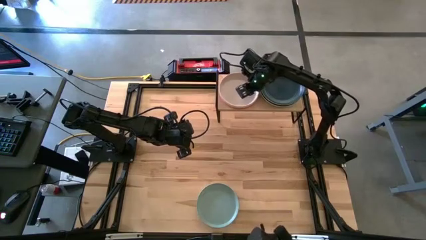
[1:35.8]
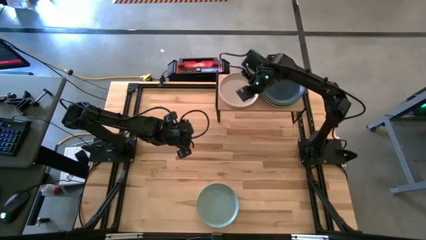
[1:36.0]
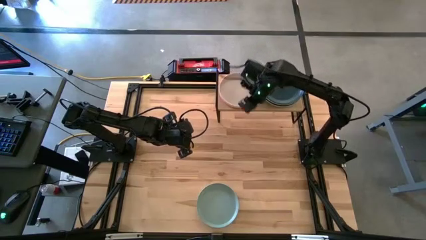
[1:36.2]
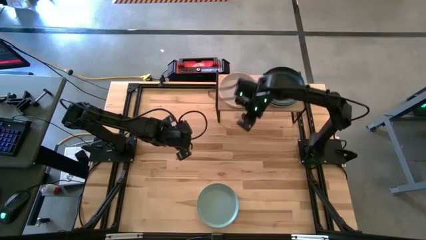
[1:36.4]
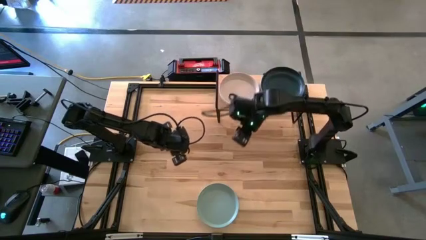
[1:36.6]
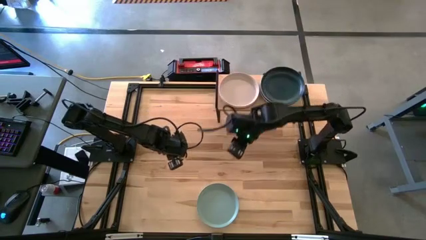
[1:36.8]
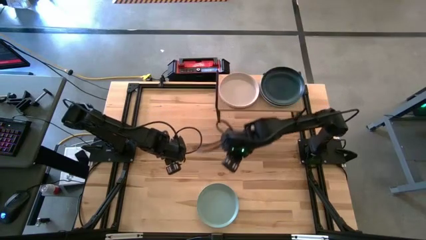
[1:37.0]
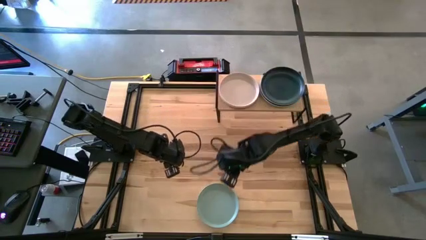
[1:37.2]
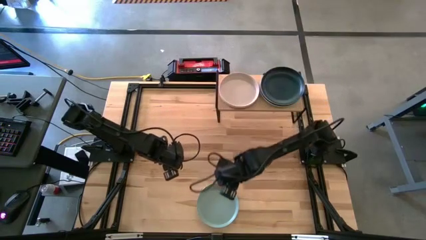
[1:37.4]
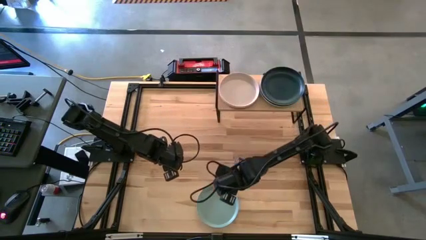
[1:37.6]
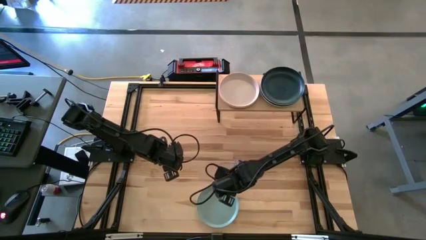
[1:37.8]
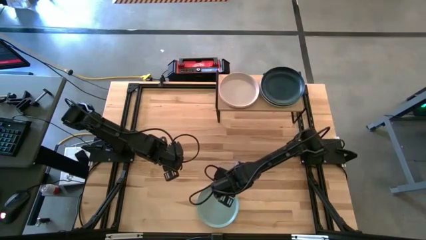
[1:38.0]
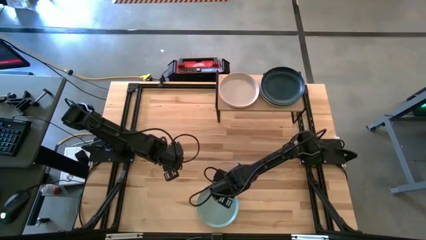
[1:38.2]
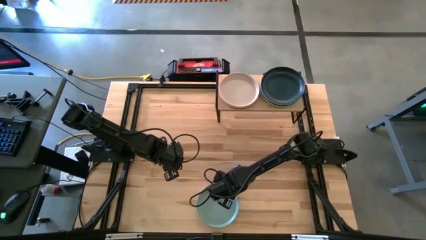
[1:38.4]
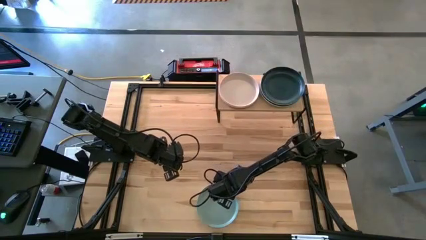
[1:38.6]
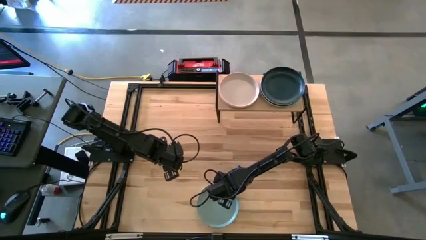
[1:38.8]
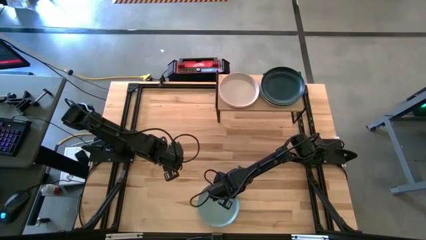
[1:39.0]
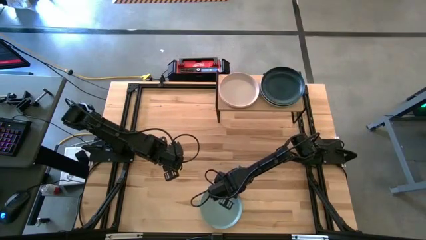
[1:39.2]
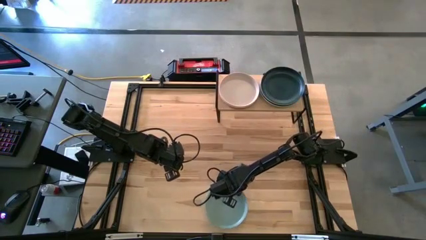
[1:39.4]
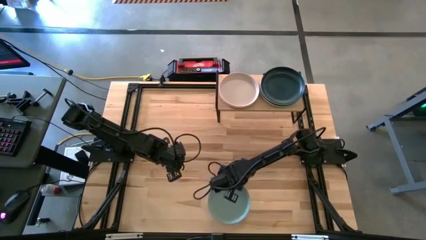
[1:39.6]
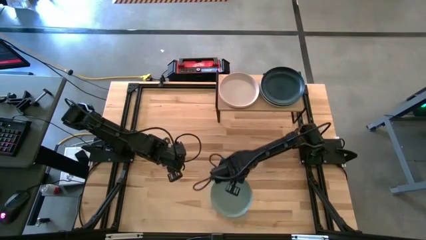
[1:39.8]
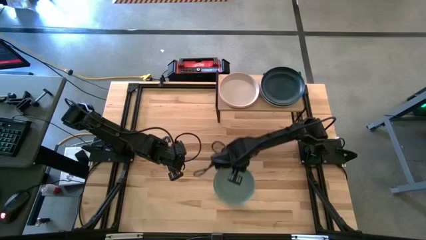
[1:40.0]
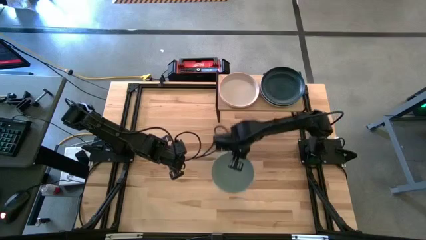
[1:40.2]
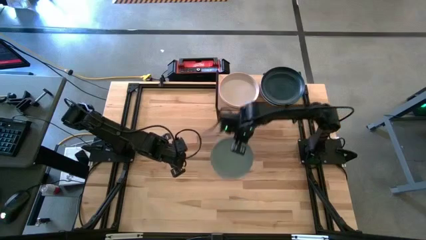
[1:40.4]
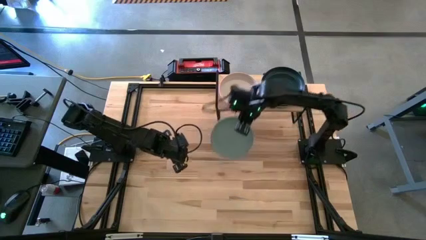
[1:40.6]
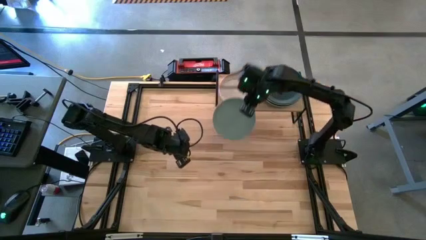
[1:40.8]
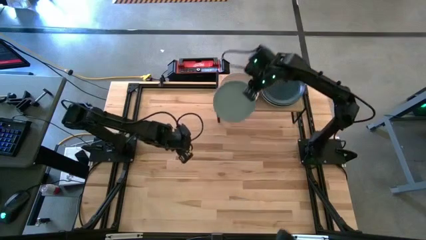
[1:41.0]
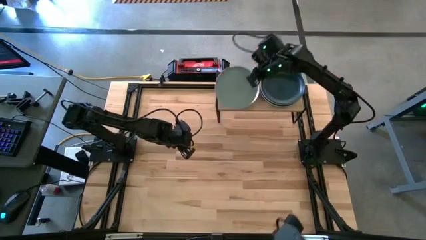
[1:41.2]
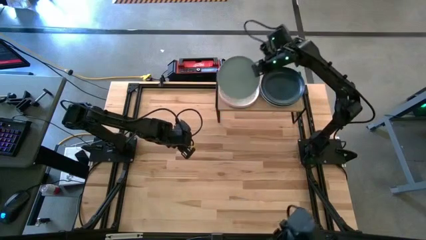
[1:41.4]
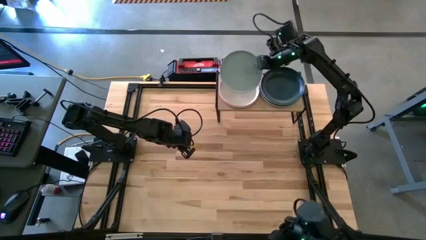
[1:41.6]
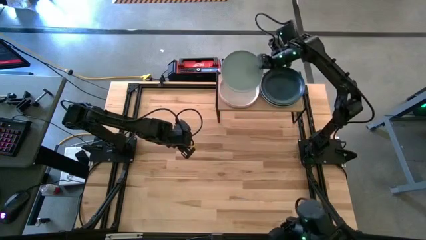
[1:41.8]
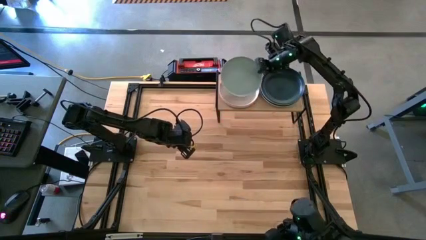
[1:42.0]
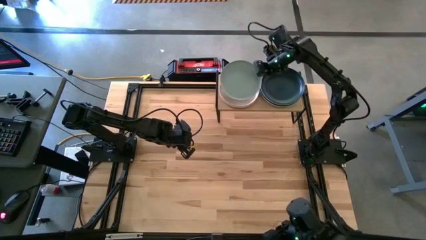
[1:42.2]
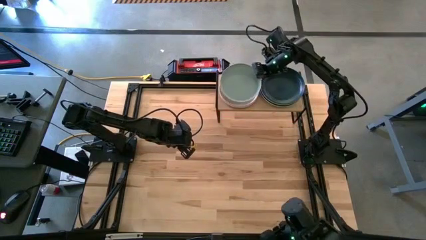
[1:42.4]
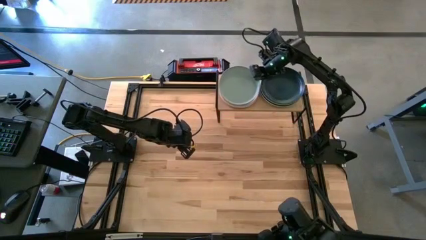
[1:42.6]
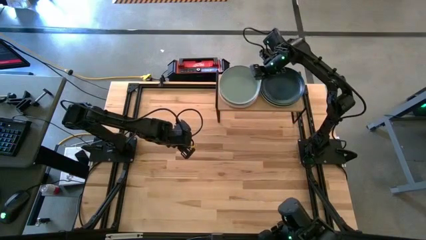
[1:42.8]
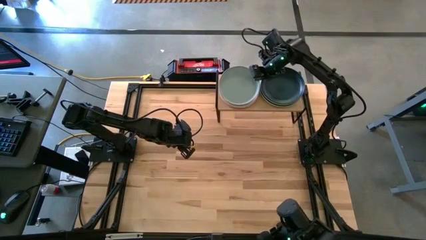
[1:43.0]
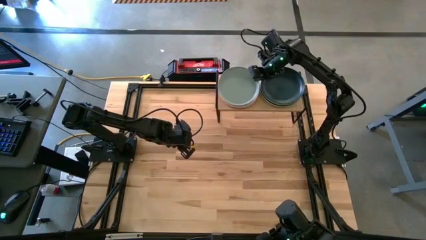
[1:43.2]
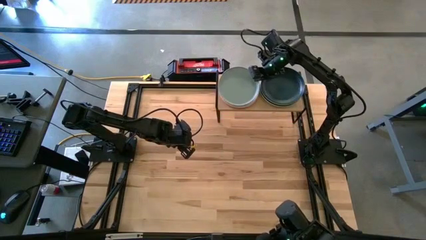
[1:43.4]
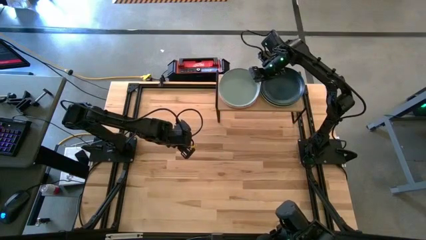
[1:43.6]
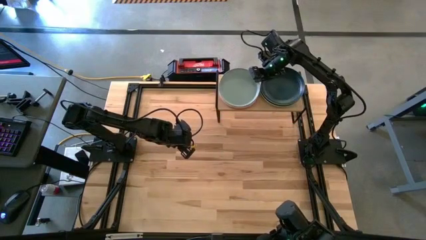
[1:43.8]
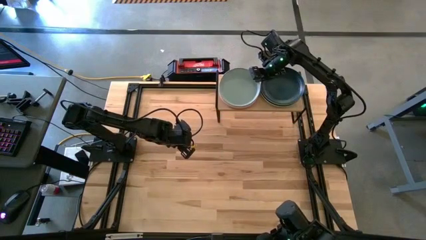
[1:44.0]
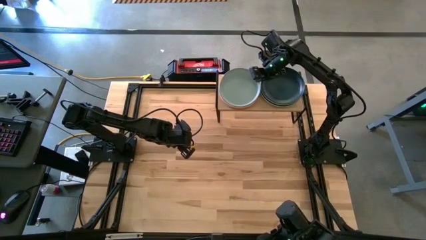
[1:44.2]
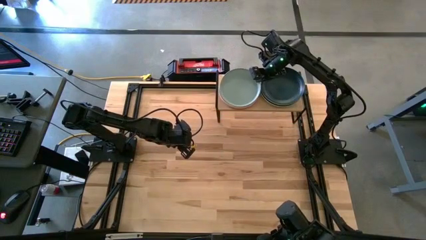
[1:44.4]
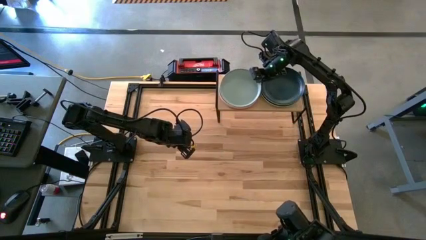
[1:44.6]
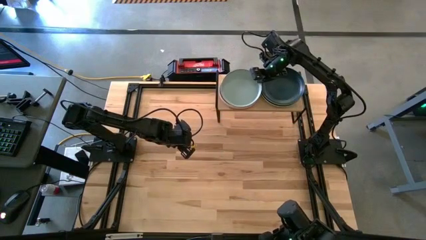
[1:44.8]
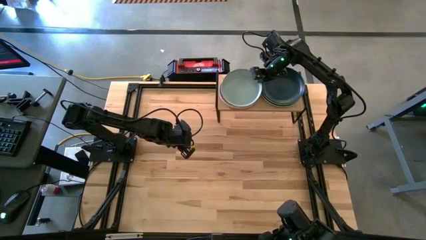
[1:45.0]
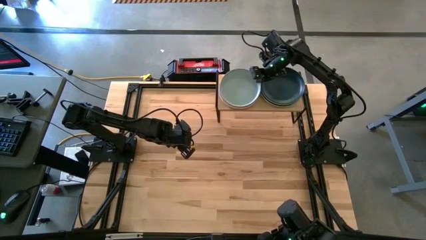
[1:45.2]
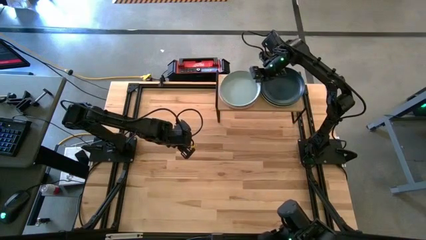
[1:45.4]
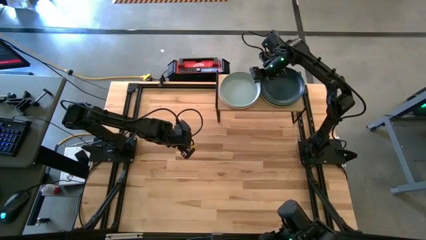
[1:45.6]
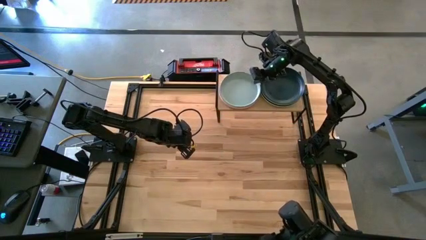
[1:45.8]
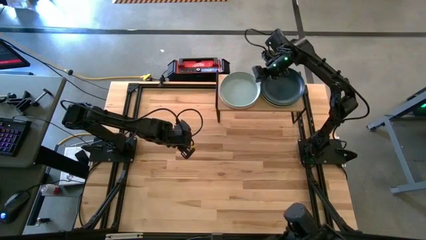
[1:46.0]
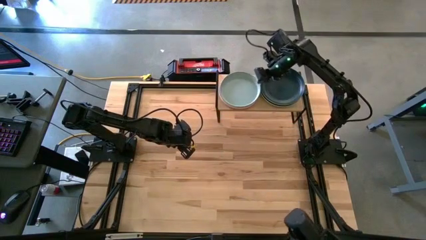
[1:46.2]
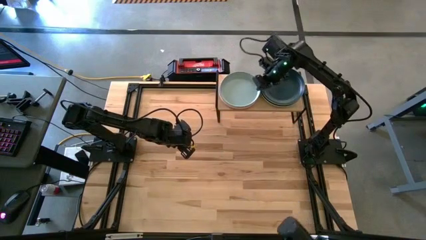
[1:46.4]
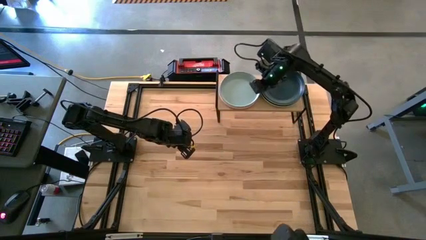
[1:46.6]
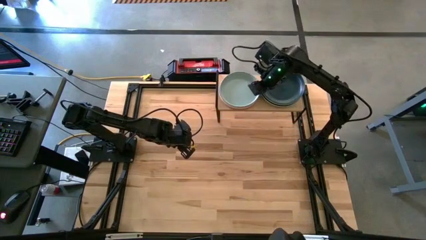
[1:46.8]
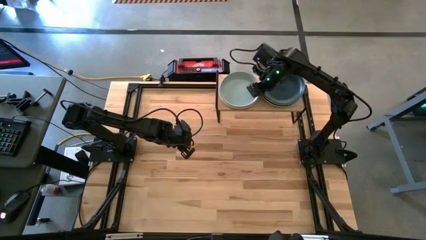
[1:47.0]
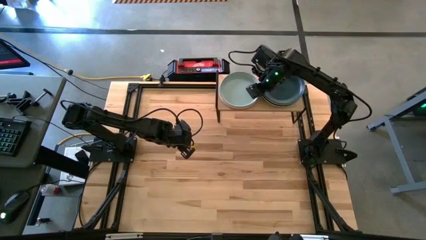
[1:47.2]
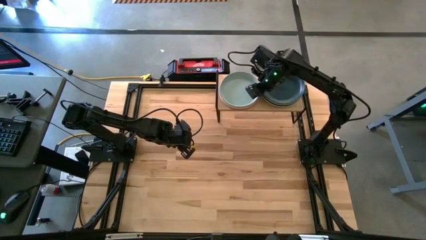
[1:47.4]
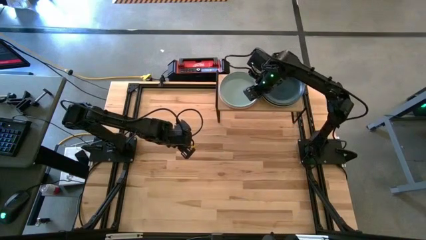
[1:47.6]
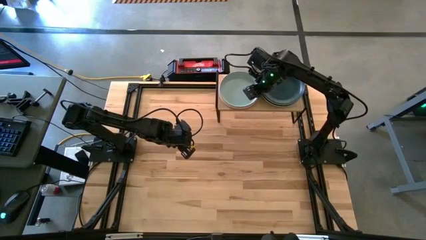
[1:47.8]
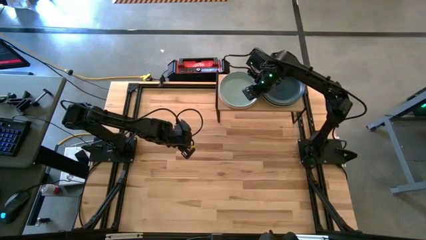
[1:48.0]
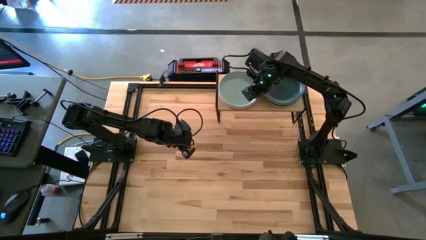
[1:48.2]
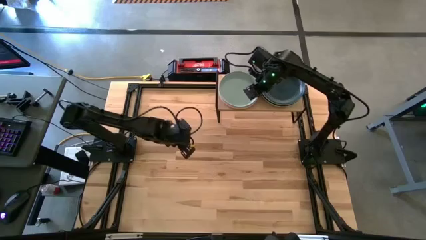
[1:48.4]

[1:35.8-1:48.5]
Task: Place and stack plates onto a shelf
Stack the light blue plate on top of the light pink plate on the shelf

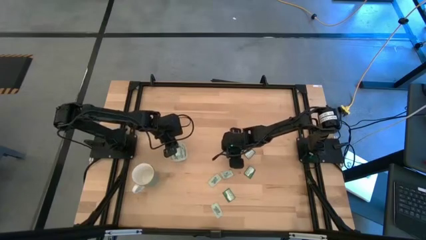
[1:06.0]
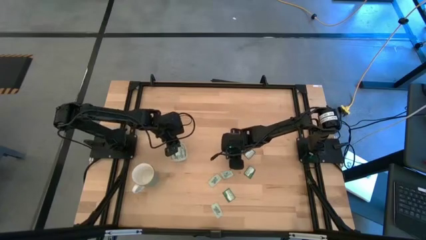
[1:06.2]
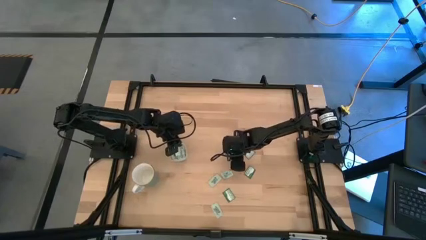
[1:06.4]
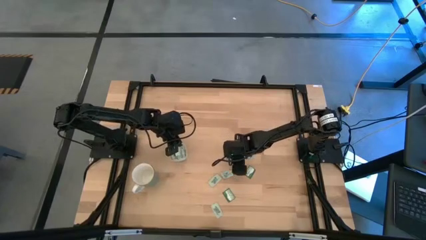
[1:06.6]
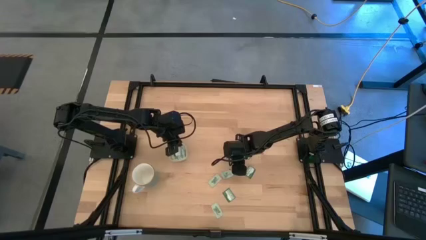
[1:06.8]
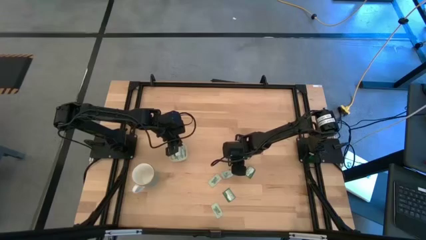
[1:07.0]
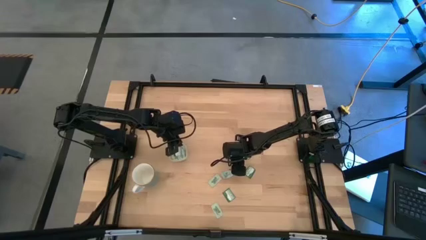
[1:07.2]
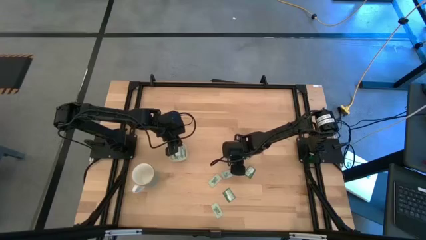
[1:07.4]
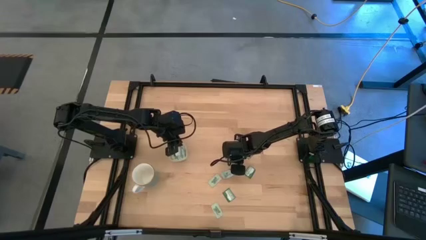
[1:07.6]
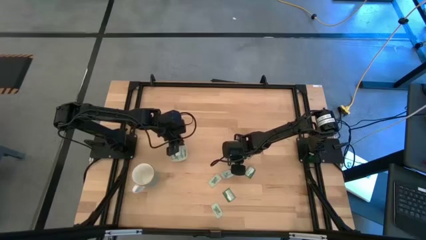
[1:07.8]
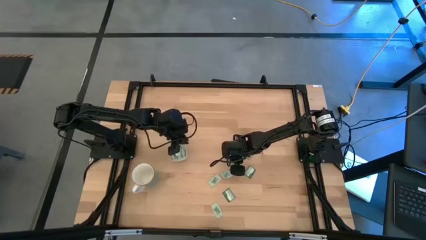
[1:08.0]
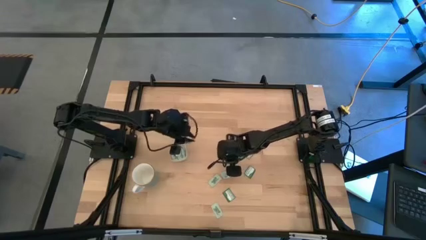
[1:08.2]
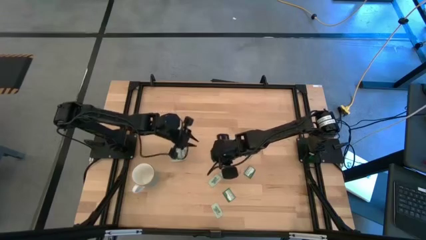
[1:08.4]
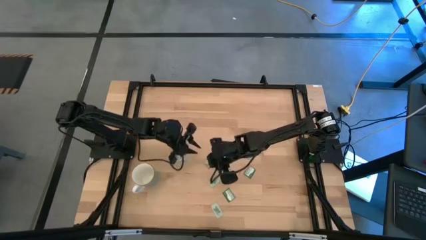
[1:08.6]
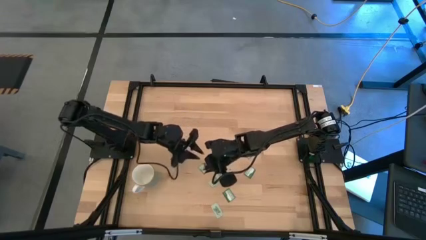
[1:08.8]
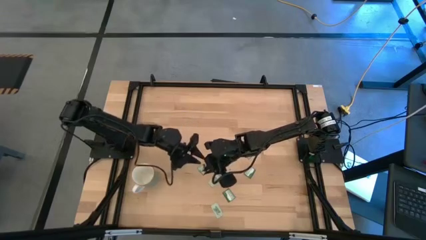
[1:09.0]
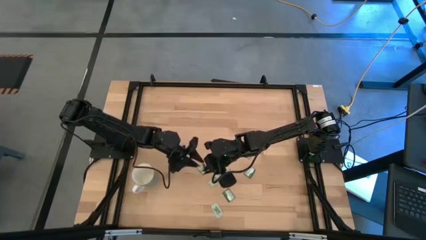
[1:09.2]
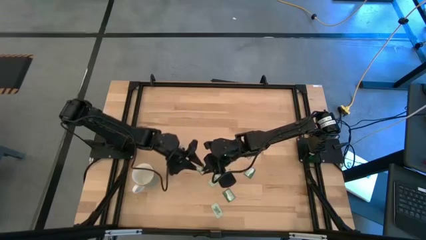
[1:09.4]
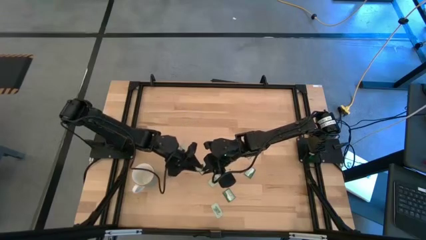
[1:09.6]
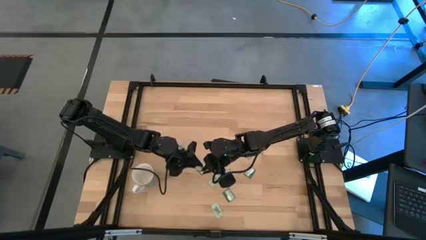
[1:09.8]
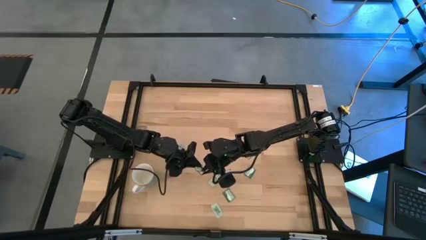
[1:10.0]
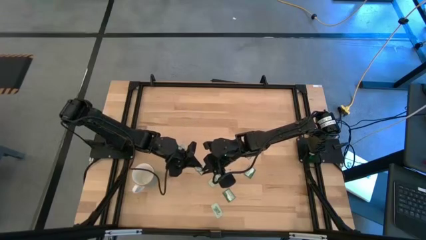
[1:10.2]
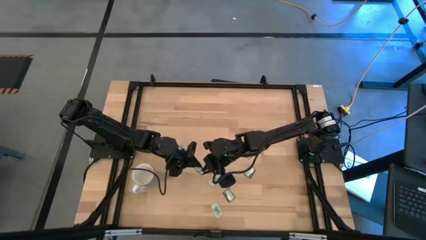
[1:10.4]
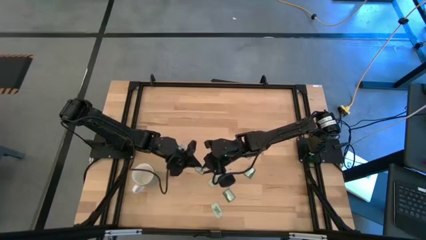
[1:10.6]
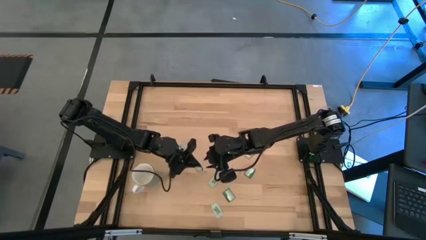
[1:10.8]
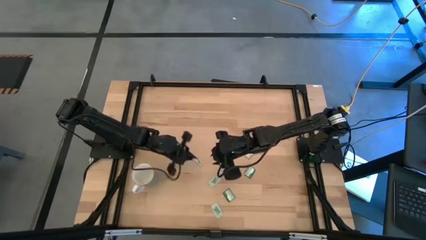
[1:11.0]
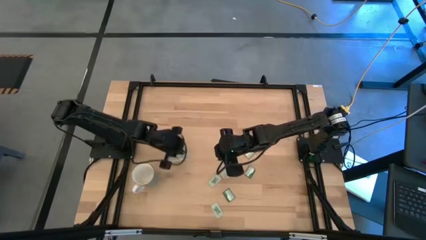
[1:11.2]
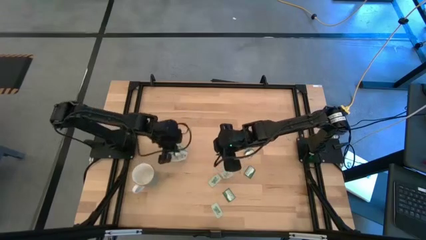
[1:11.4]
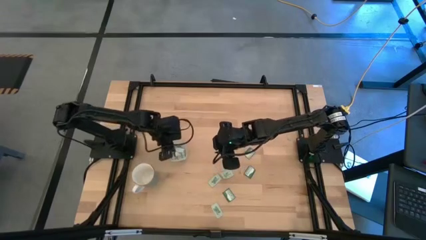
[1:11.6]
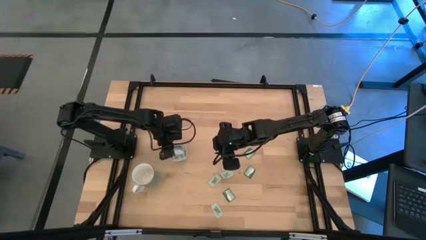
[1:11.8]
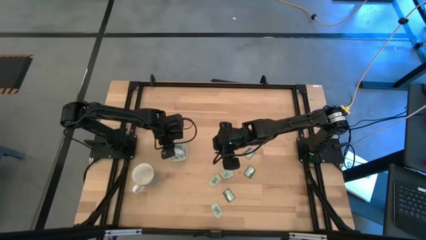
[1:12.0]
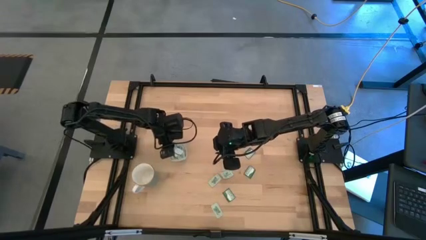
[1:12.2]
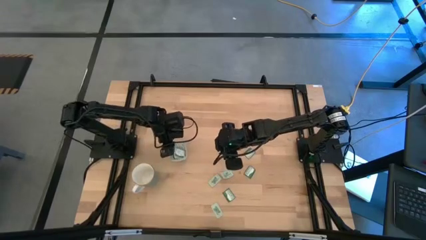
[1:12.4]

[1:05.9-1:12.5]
Task: Pick and place Stevia / Truvia into bins
Put the dark green stevia packet into the transparent container
